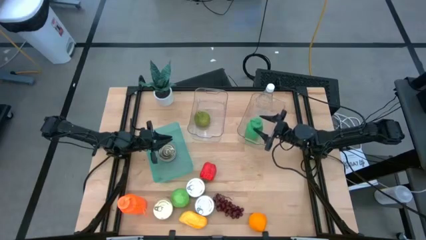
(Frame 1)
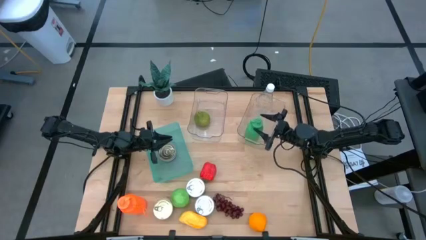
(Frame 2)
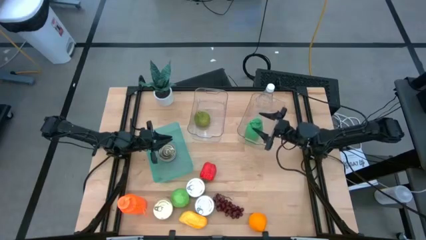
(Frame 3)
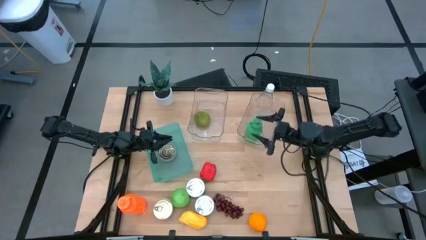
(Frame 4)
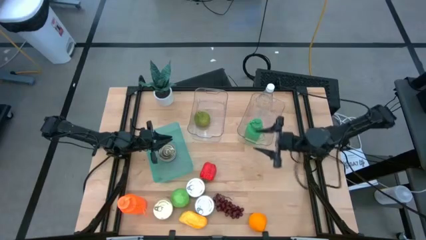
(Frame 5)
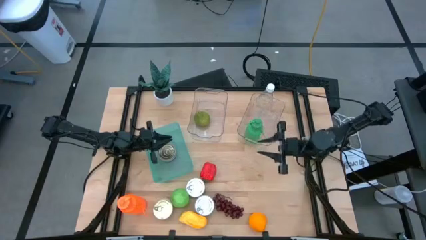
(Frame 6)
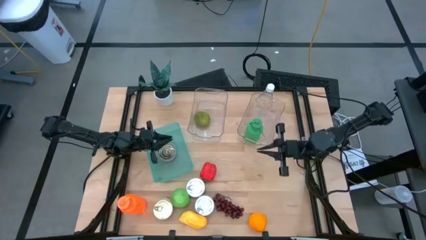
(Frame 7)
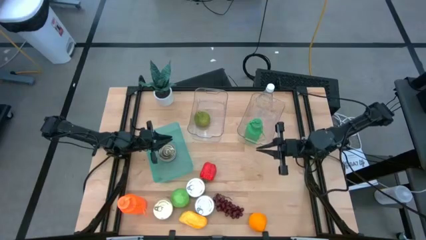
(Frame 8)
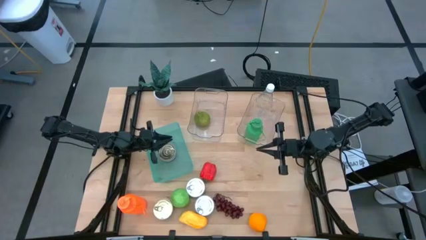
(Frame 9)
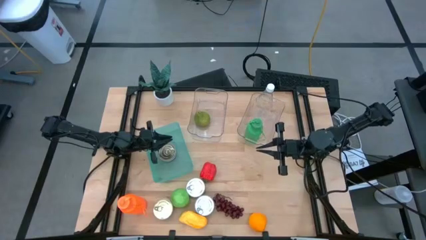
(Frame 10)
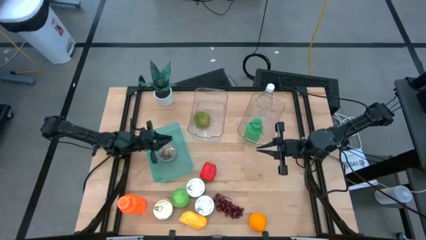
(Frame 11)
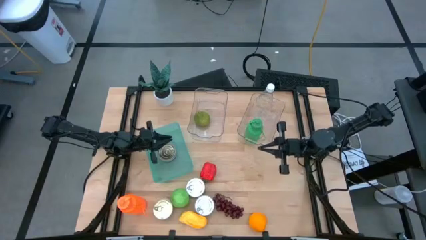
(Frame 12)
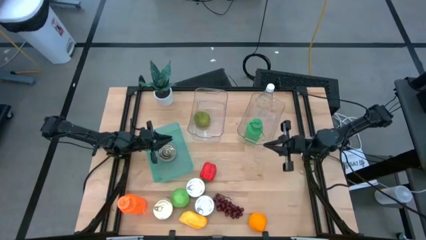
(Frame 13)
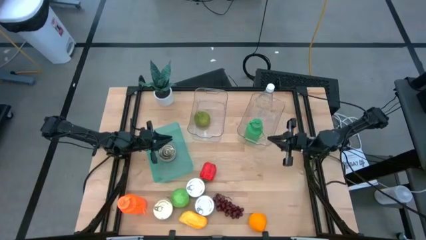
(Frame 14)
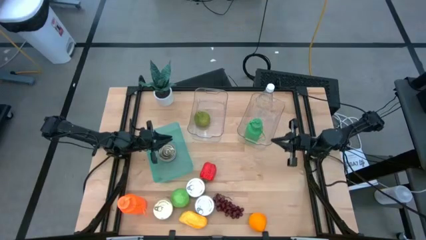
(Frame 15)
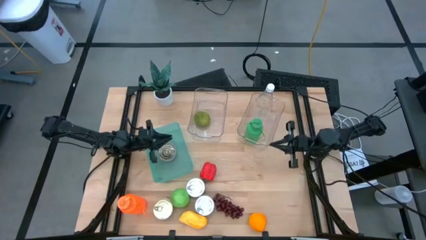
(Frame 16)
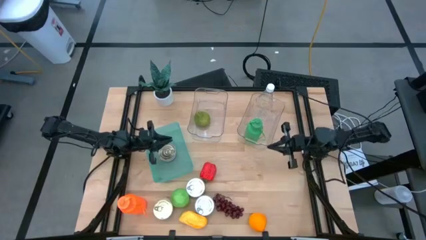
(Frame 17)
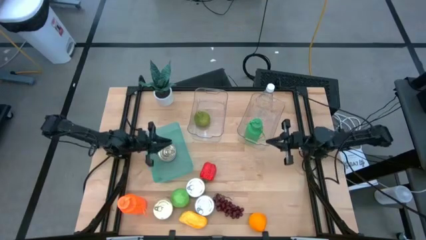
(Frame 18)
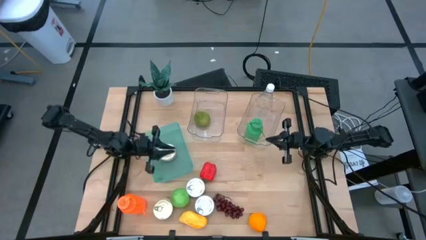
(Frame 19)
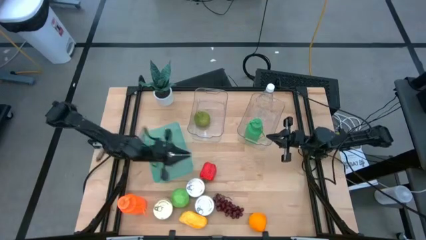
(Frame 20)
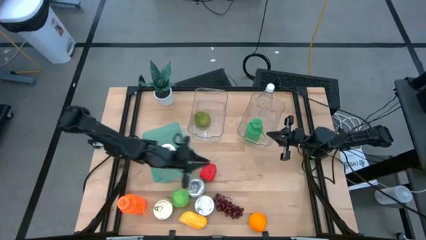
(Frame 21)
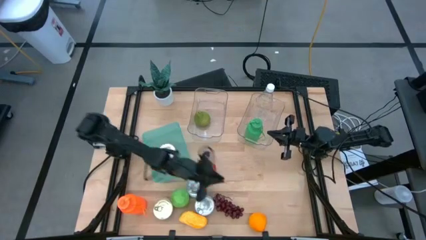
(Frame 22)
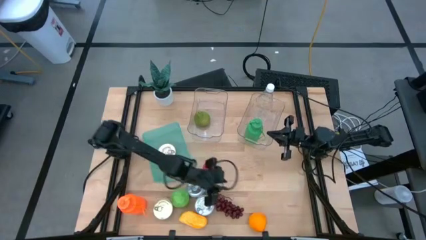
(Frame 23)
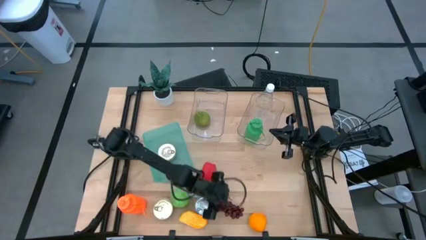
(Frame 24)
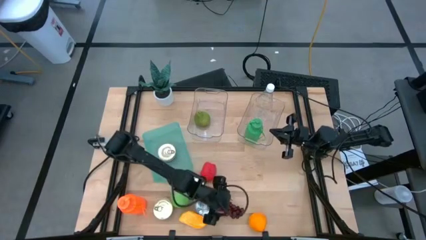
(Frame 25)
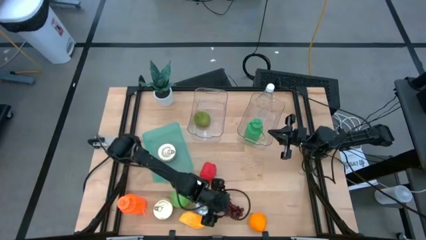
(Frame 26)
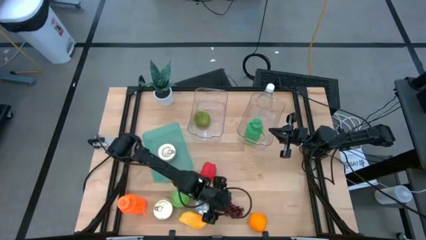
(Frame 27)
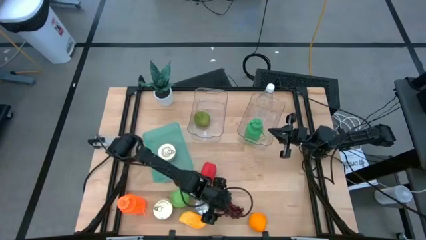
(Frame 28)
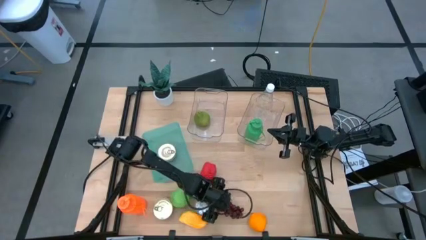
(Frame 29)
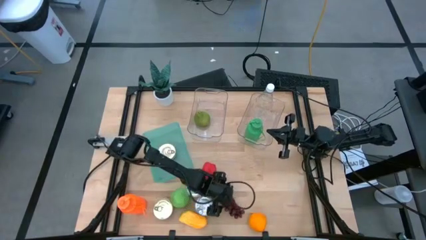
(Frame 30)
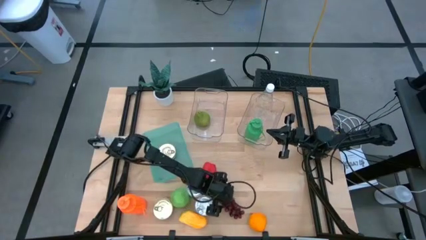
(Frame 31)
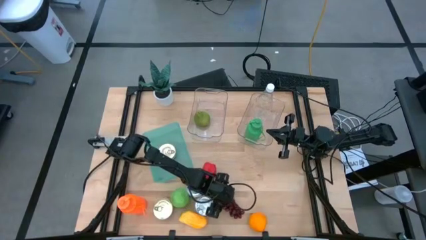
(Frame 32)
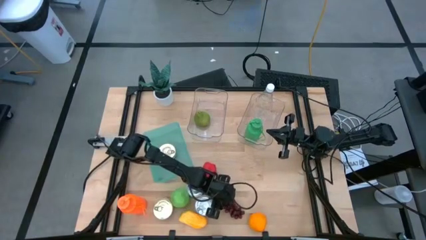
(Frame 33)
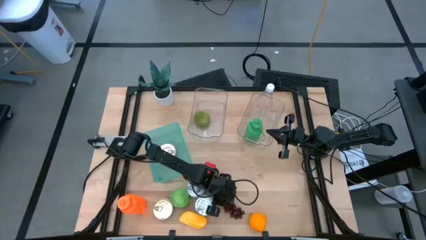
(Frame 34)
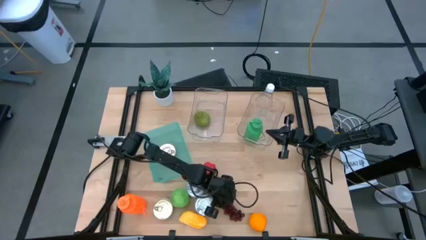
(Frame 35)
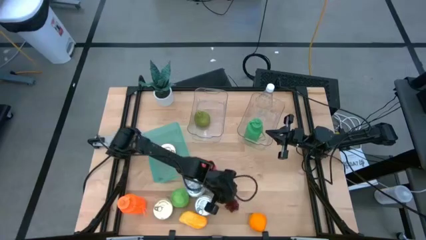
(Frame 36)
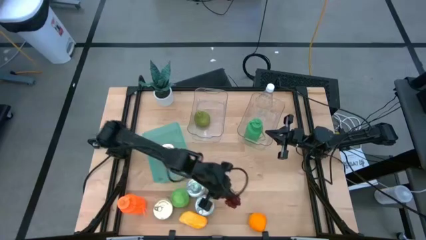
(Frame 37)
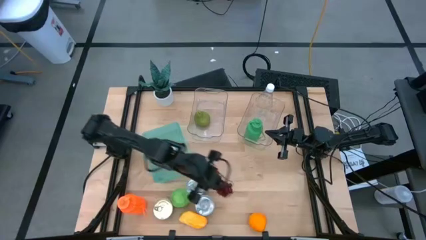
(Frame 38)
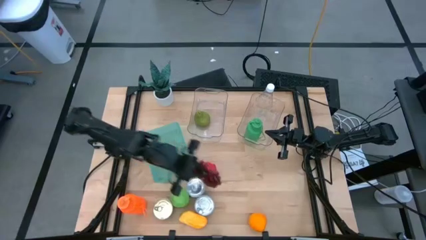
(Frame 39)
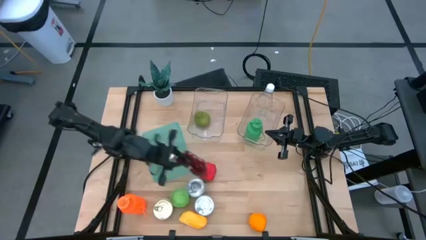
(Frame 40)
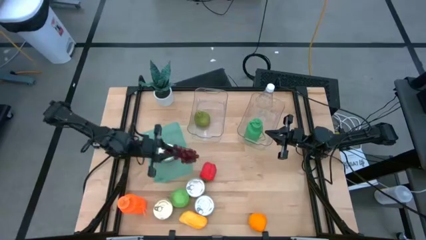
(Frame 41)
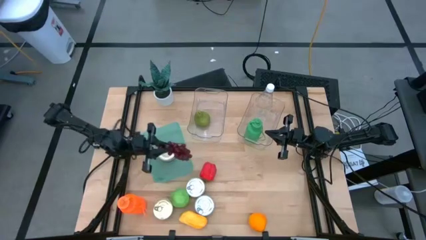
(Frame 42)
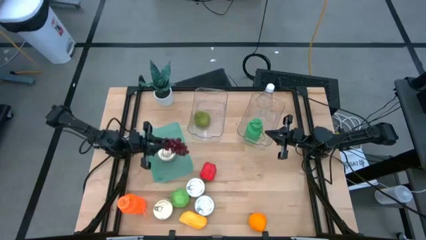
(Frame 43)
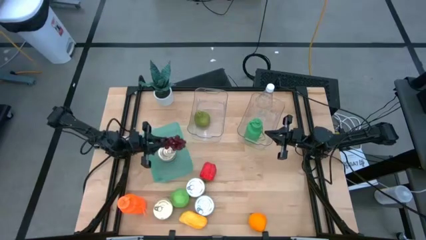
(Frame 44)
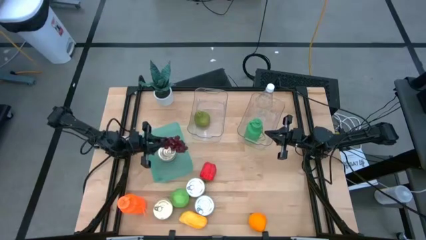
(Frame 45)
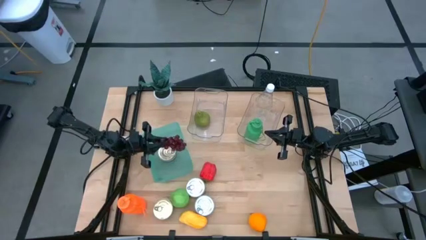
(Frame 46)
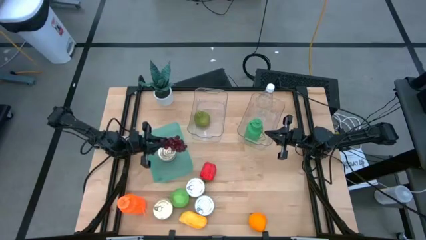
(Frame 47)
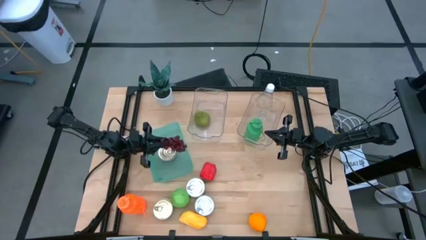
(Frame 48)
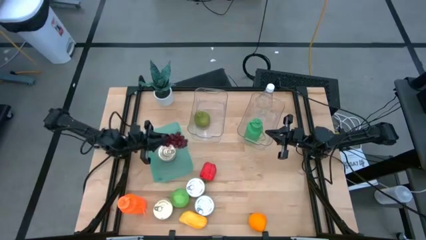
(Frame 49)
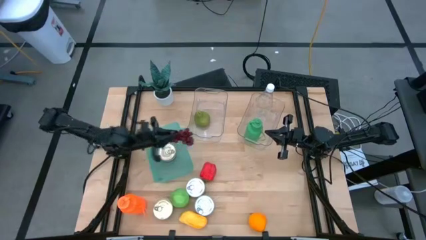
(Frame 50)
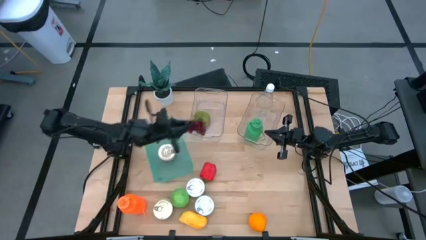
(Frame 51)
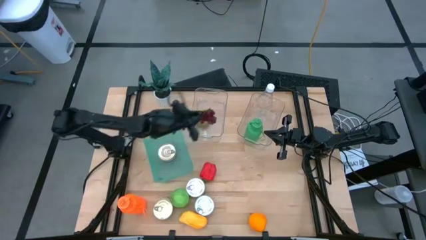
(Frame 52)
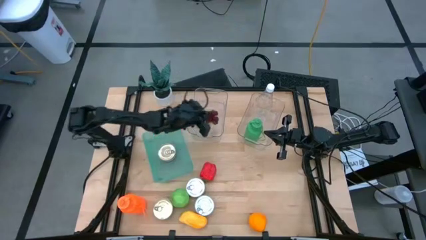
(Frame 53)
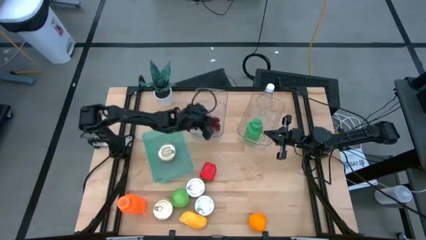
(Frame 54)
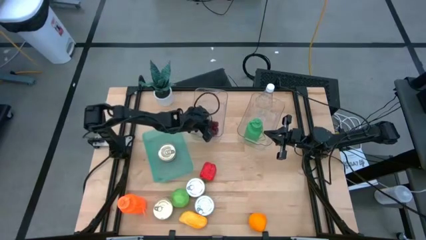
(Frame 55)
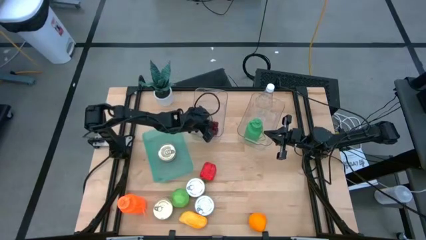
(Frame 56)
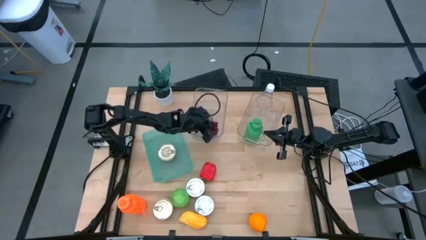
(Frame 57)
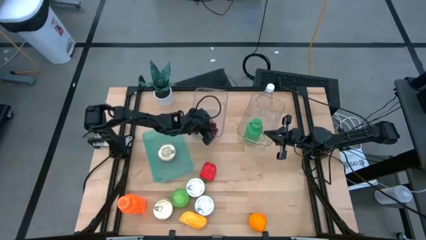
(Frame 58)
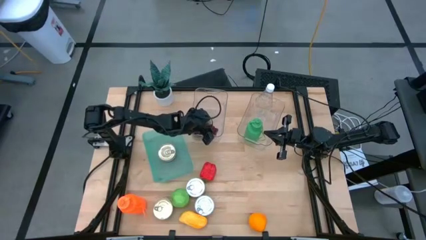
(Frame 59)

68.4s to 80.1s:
Task: Pick & Place Food Item
Put the grapes into the left transparent bin
